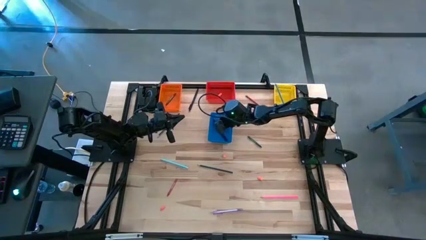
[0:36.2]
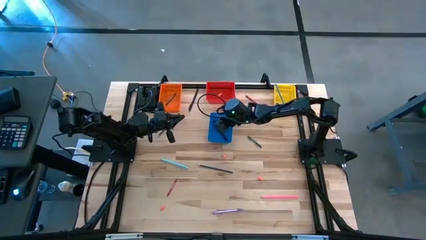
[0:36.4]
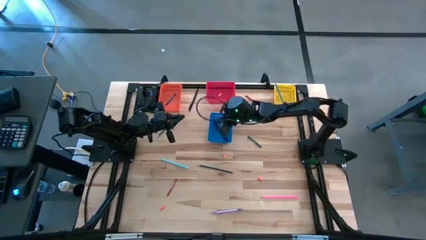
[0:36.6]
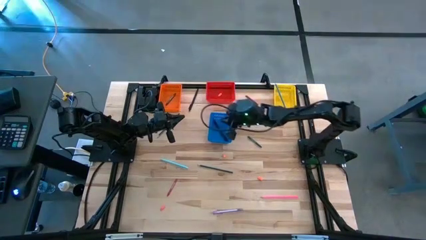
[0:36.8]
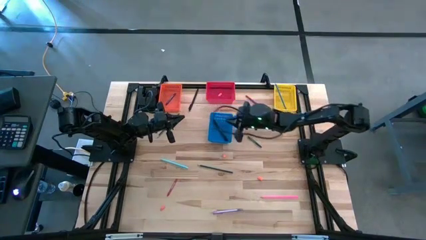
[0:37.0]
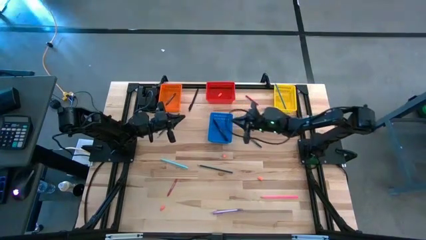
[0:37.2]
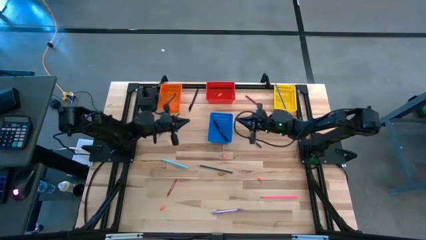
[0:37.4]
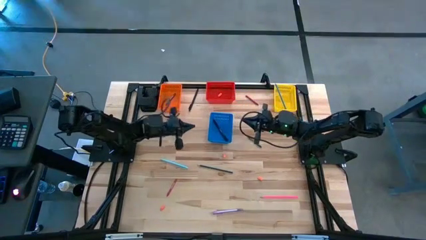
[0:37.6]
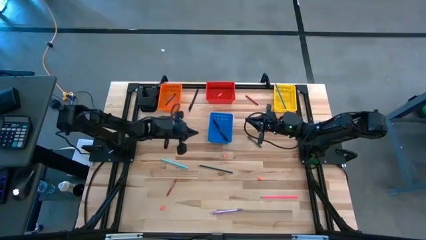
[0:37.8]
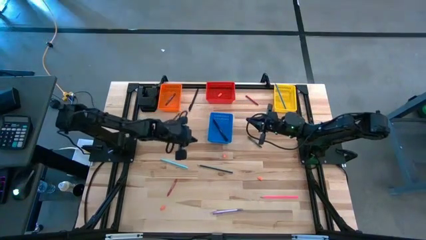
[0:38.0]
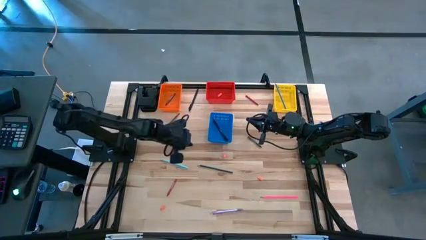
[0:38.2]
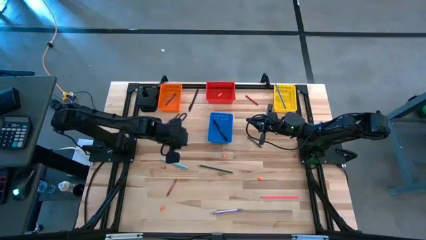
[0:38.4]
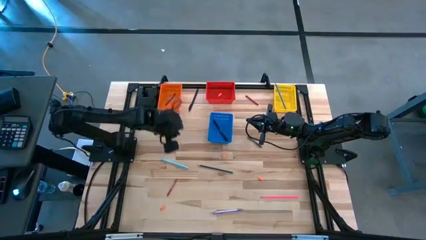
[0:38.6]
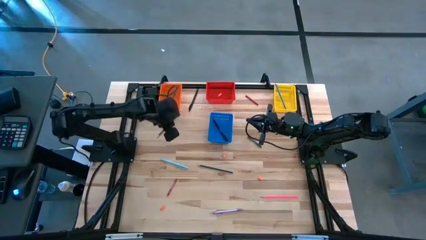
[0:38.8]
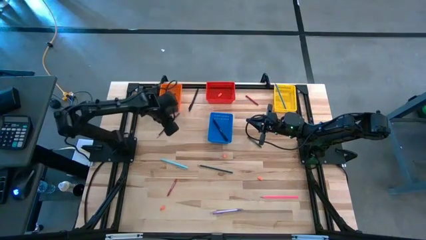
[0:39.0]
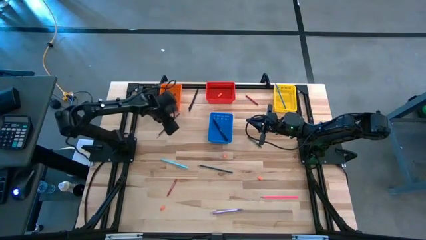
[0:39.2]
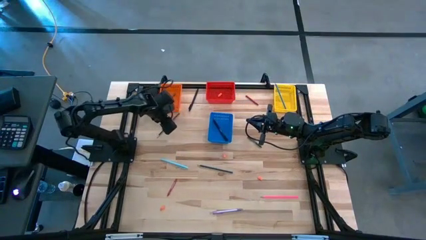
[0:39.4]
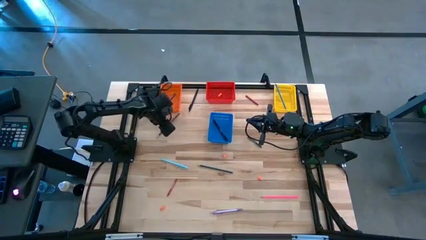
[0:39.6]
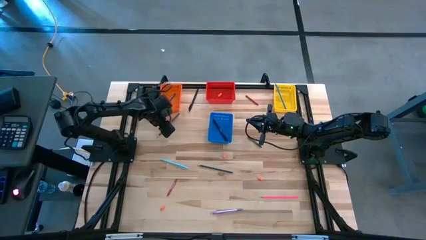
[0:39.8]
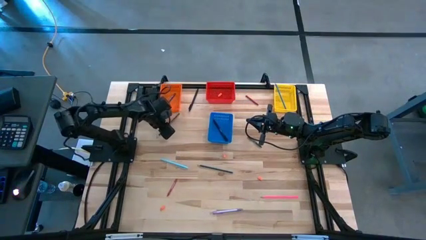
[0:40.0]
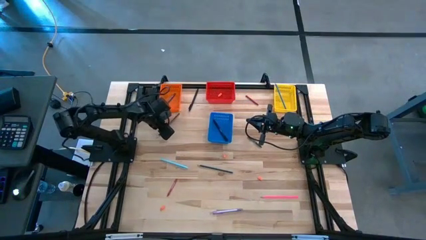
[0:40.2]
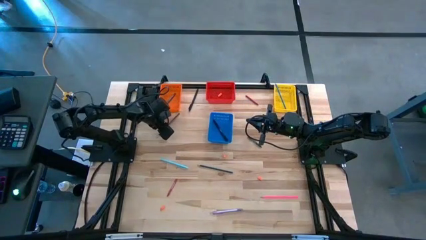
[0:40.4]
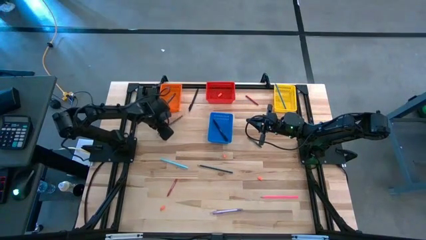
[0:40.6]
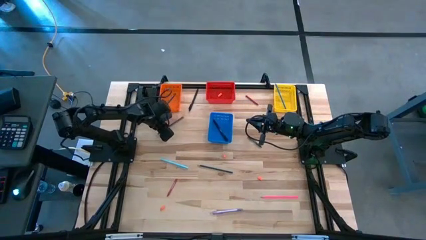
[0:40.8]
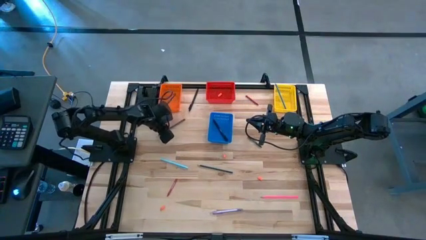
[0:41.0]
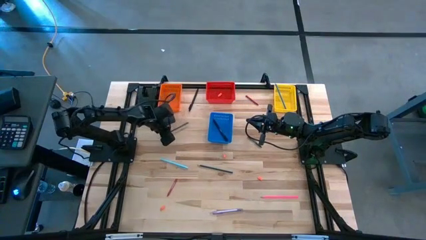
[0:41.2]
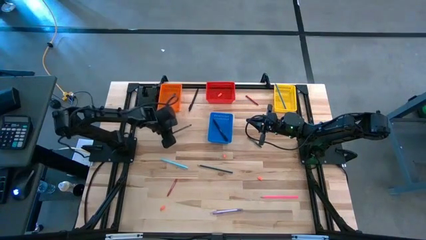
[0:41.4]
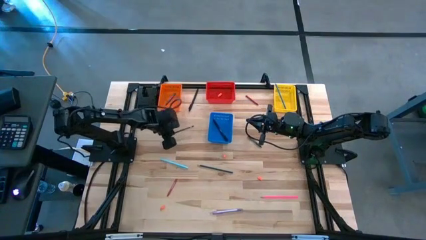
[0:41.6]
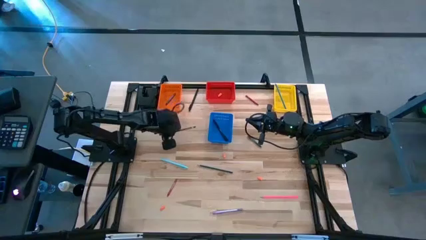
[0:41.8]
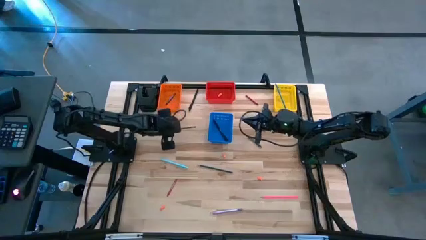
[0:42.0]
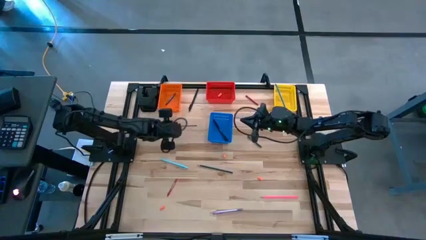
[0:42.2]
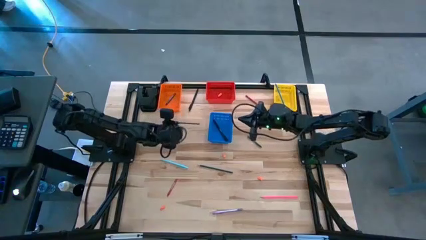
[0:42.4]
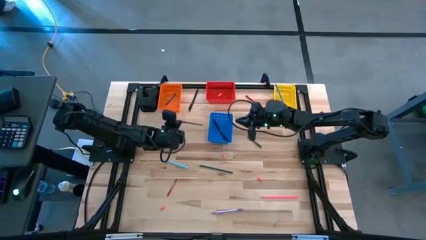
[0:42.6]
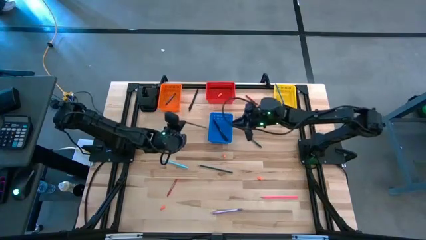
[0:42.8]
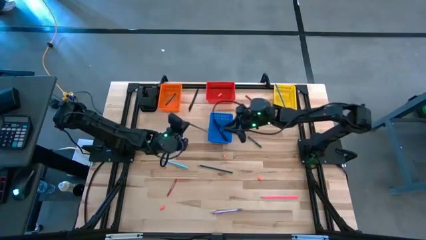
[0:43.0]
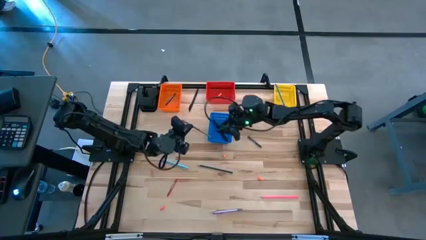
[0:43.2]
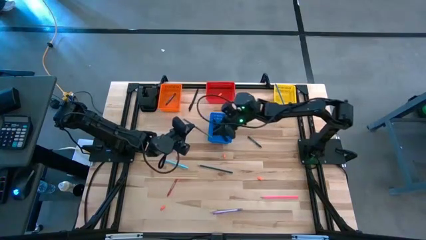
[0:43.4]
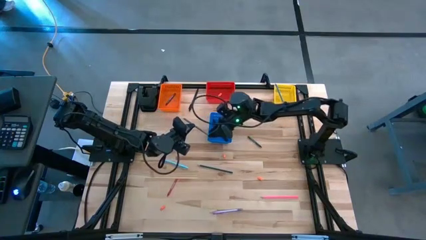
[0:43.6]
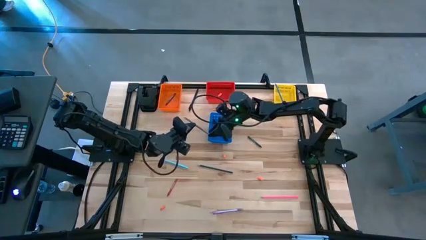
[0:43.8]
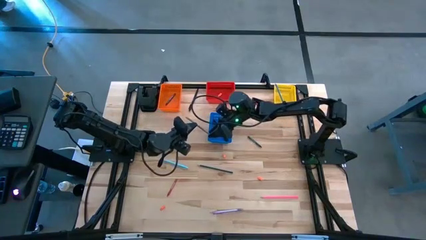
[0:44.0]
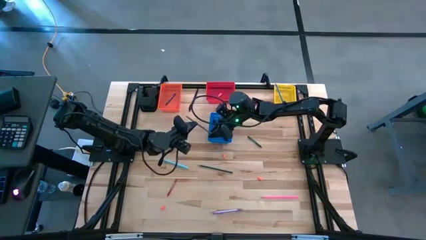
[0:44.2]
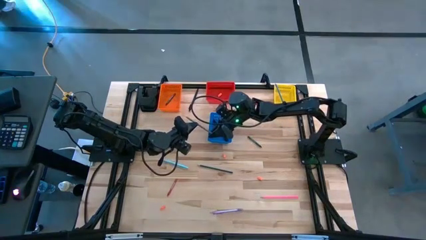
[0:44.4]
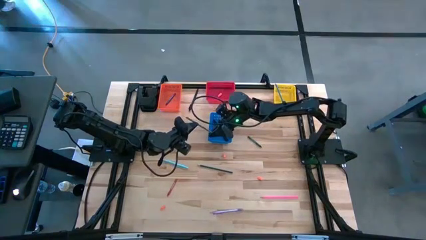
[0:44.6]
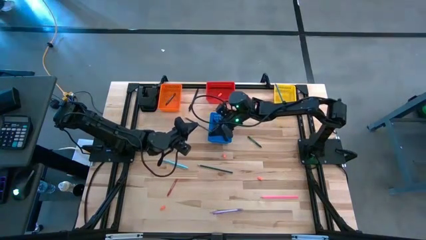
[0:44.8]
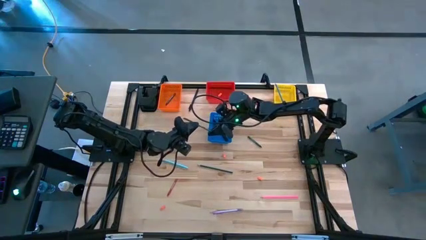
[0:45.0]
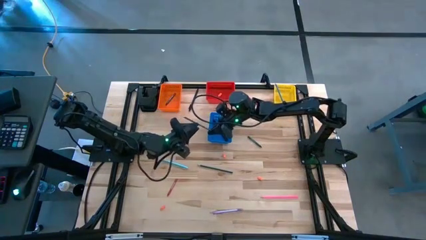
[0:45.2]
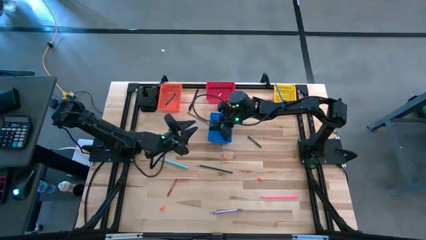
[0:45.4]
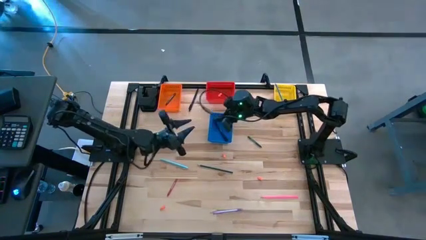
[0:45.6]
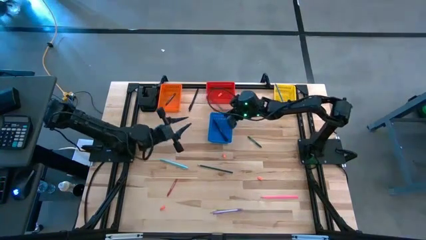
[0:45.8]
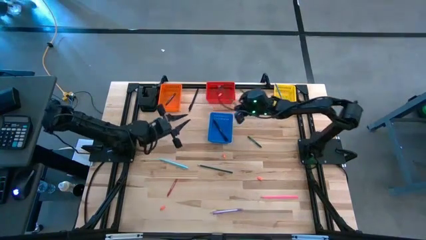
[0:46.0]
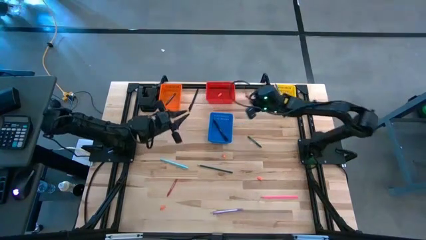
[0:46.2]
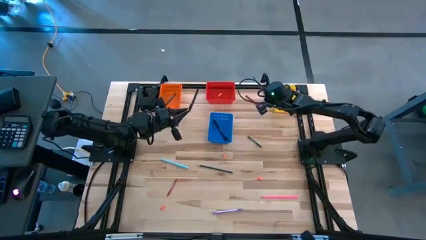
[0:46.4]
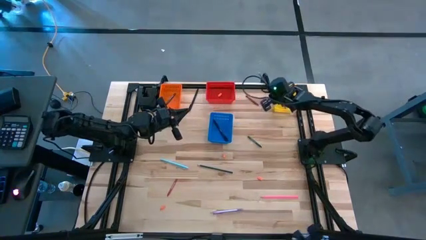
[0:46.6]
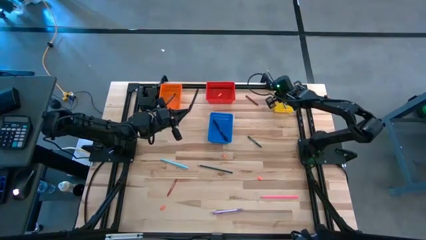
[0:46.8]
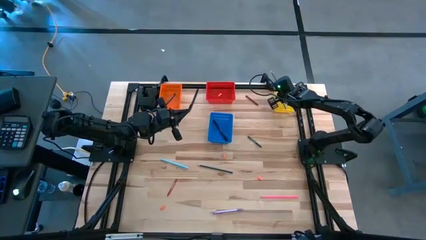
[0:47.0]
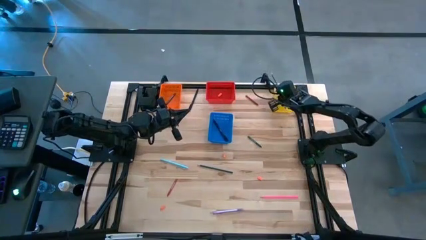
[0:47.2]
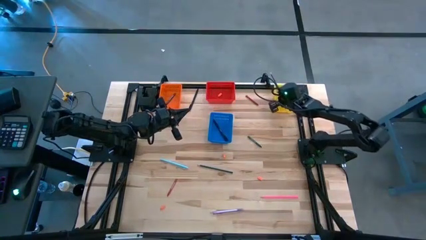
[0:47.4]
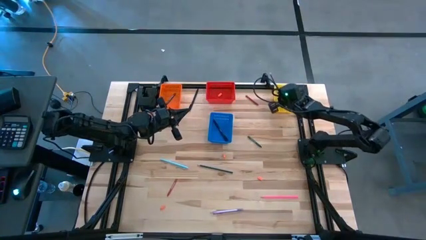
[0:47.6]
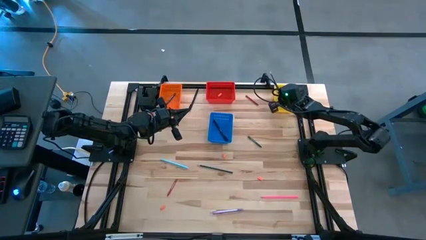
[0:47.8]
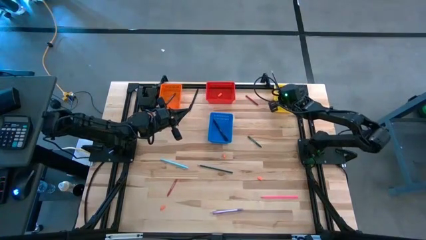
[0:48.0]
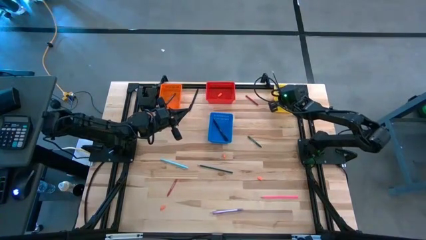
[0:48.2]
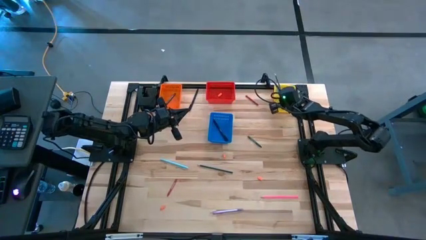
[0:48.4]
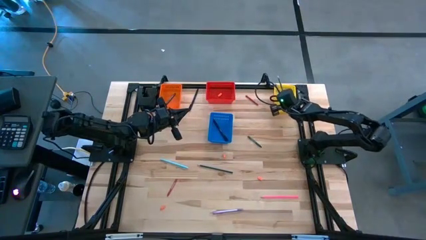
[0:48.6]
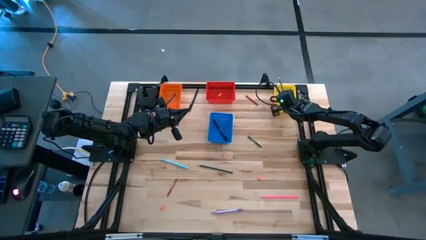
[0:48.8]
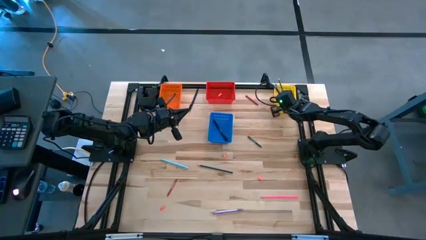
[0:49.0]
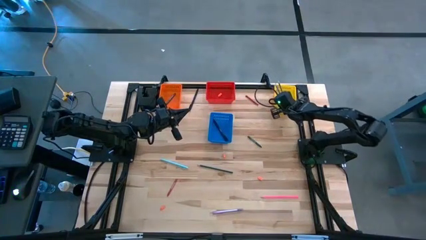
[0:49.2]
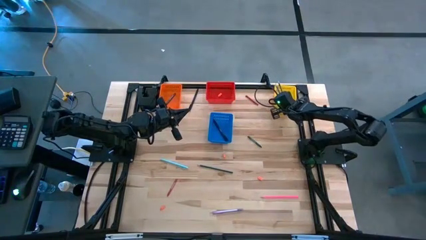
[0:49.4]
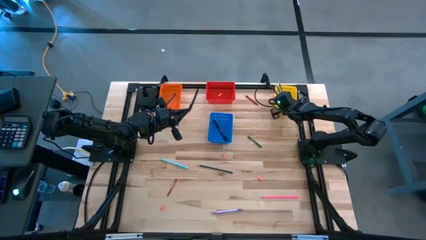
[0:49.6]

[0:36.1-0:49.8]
Task: Sort crayons/erasers/pens/pencils in bins
Put the black pencil into the yellow bin

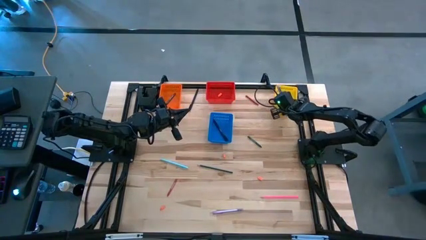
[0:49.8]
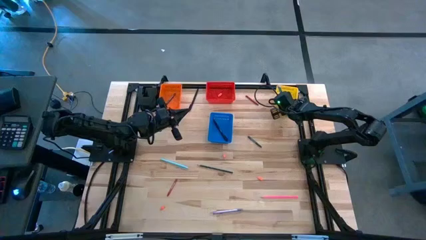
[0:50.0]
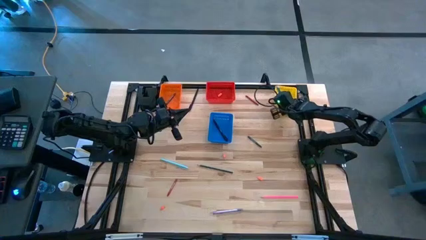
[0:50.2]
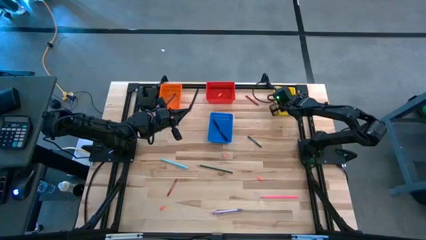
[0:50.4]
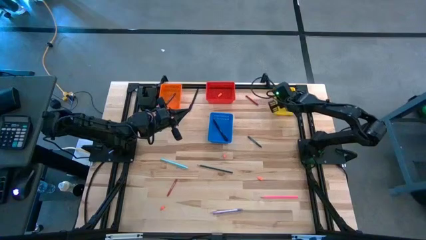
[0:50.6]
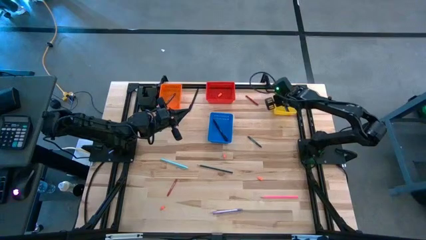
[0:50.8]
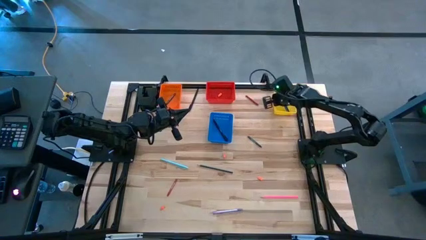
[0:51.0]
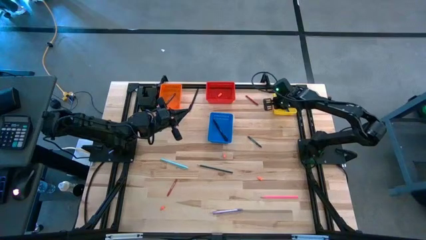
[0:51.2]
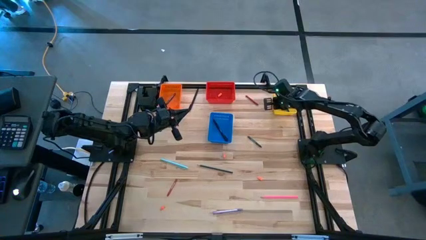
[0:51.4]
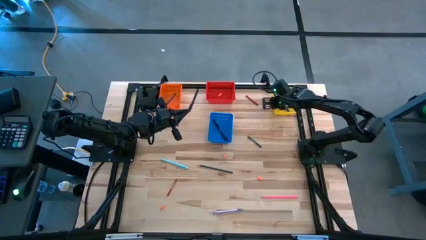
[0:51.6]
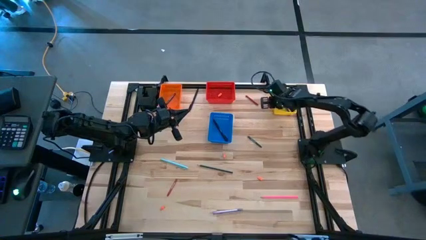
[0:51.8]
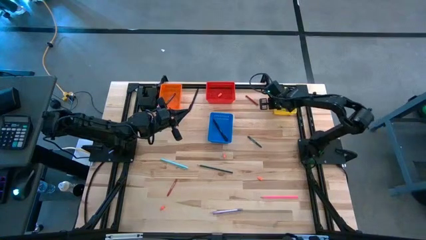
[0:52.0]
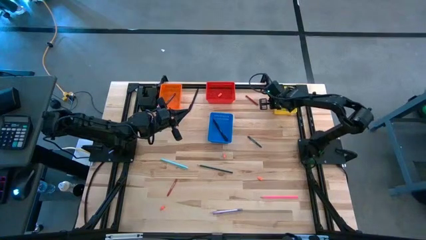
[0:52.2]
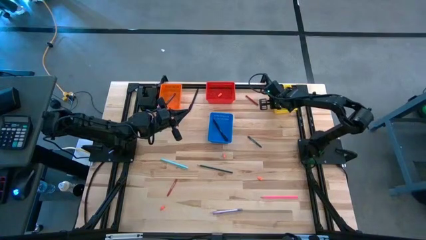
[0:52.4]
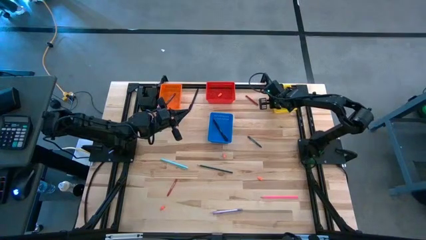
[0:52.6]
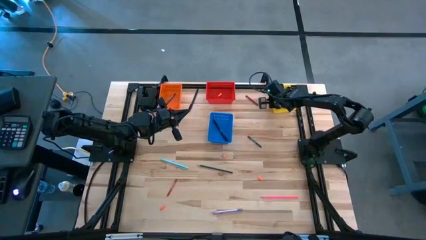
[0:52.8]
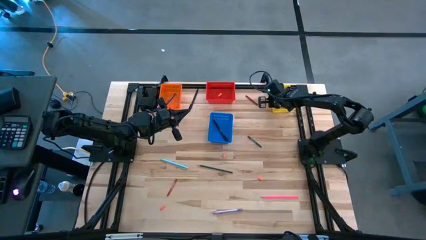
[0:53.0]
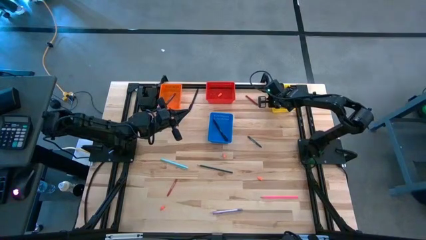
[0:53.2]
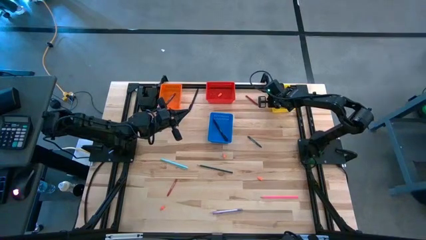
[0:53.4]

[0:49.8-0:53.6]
Adjust the yellow bin
